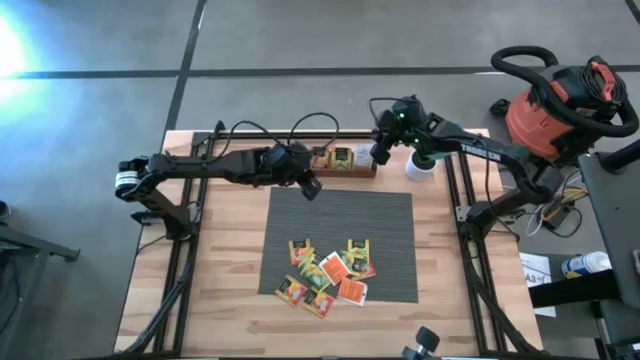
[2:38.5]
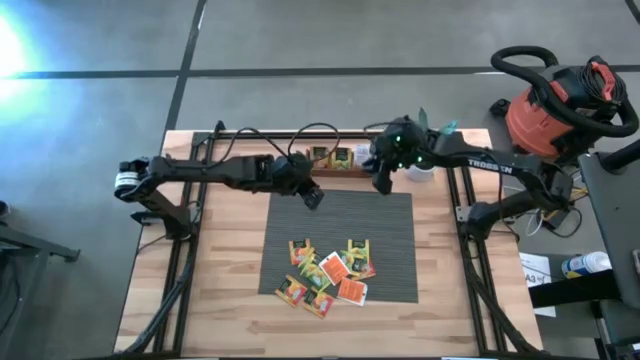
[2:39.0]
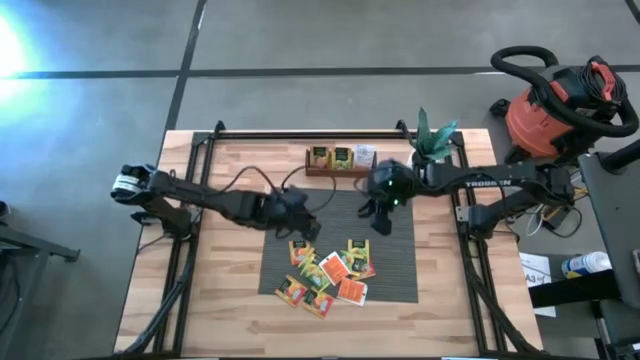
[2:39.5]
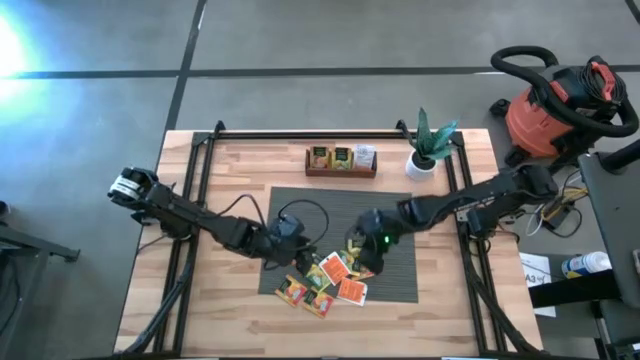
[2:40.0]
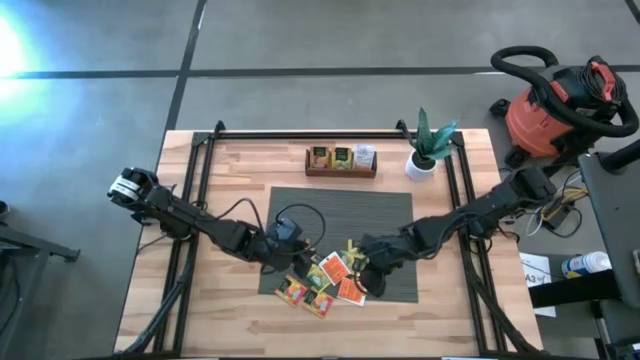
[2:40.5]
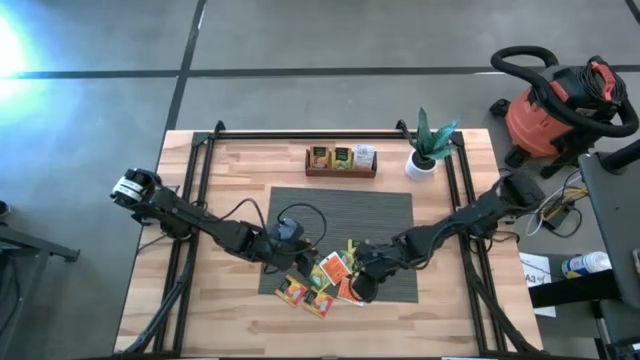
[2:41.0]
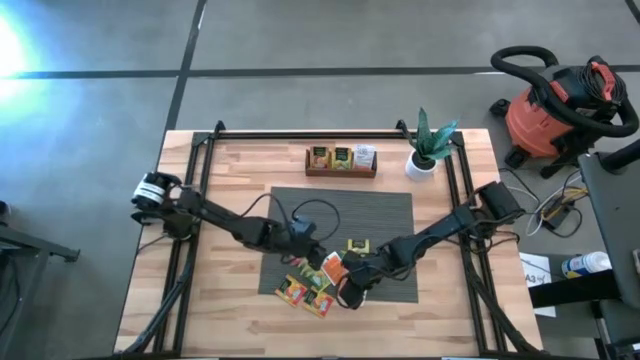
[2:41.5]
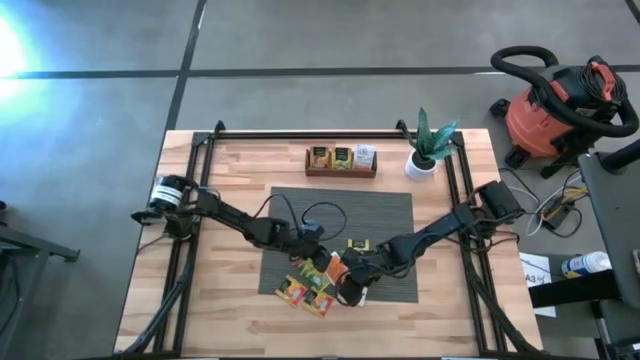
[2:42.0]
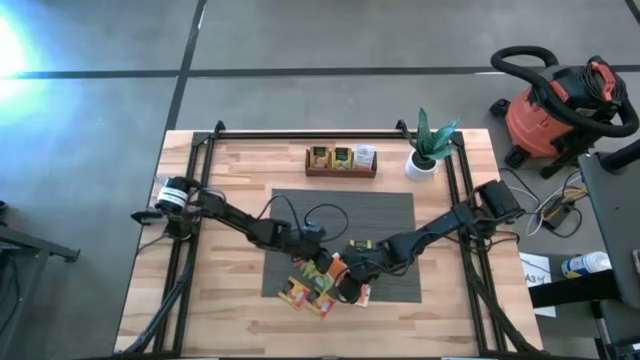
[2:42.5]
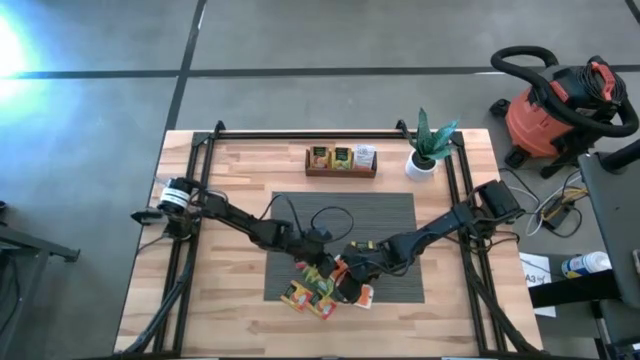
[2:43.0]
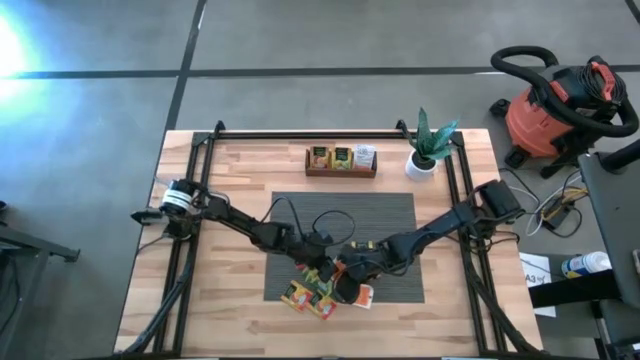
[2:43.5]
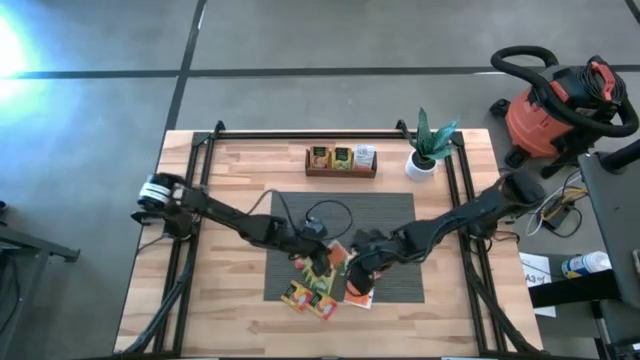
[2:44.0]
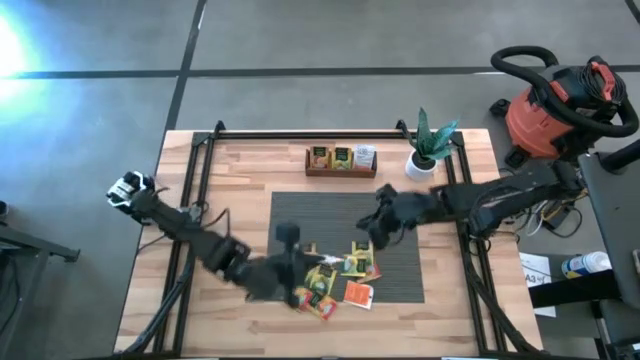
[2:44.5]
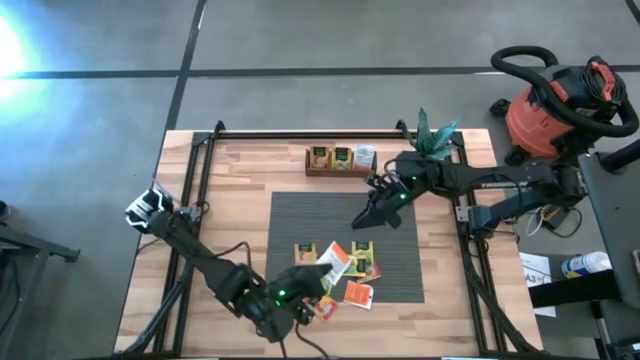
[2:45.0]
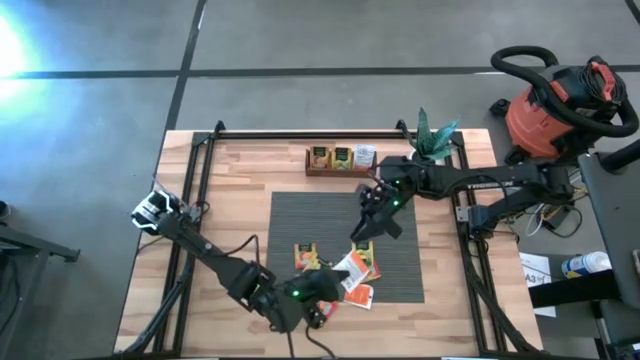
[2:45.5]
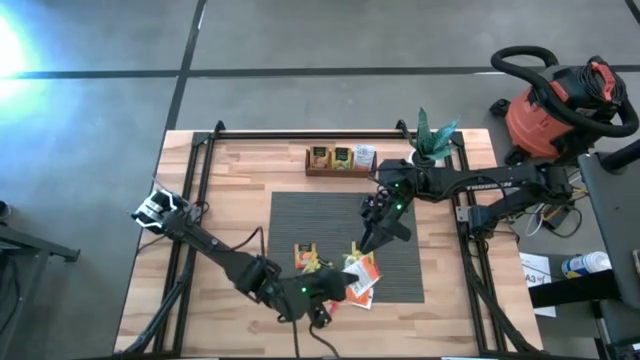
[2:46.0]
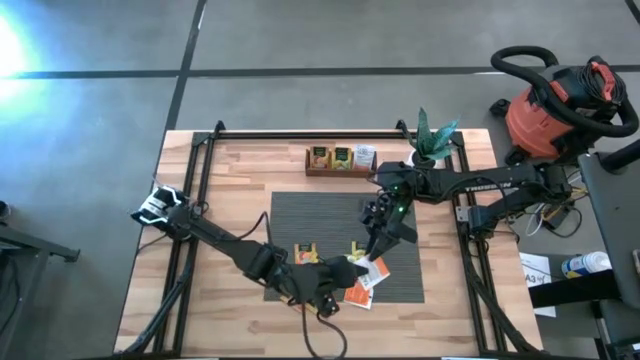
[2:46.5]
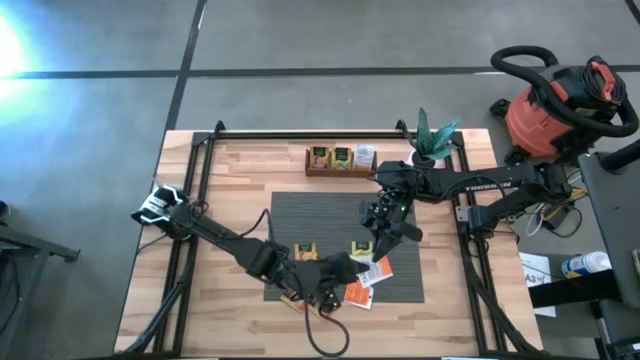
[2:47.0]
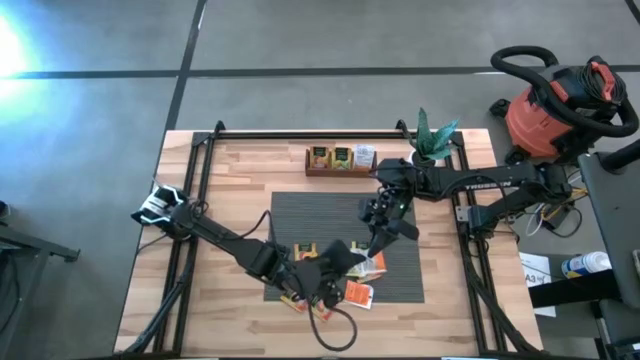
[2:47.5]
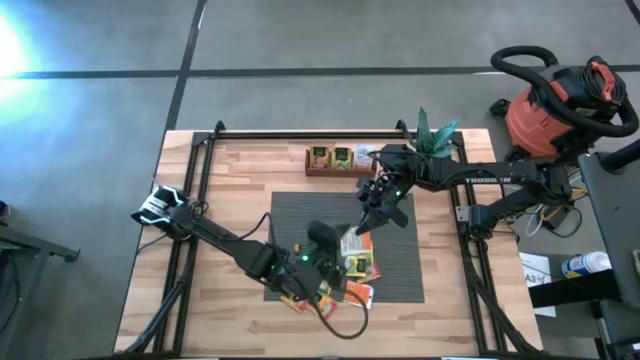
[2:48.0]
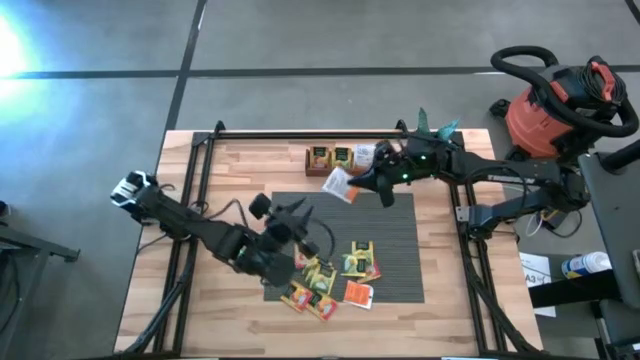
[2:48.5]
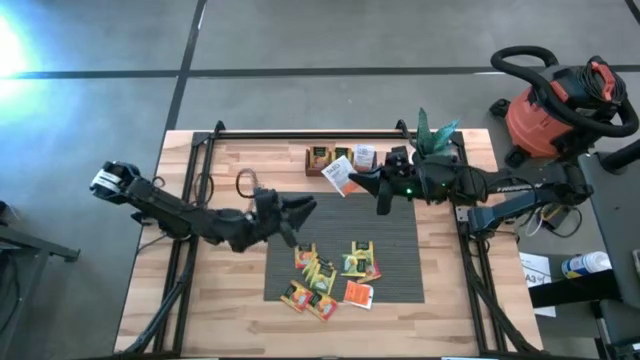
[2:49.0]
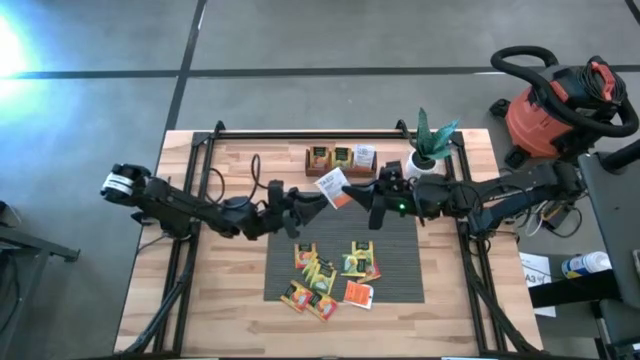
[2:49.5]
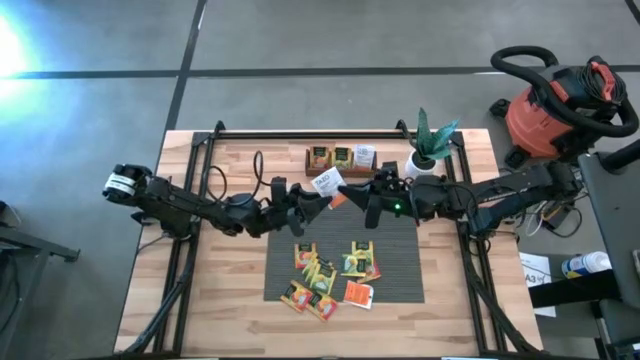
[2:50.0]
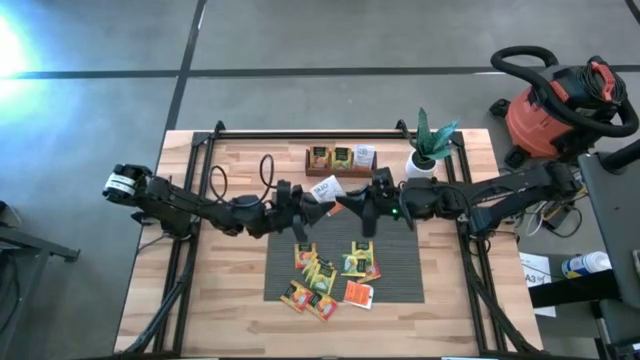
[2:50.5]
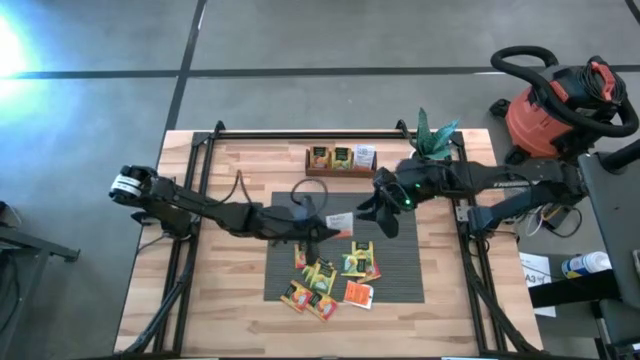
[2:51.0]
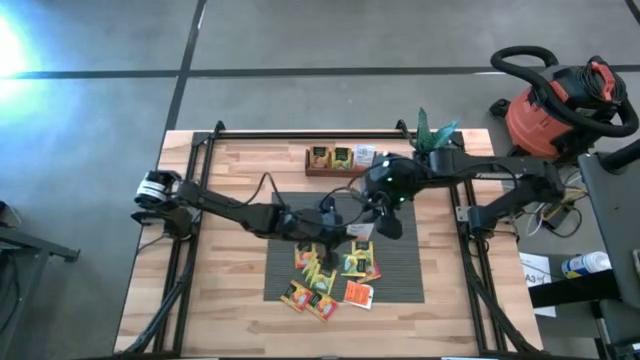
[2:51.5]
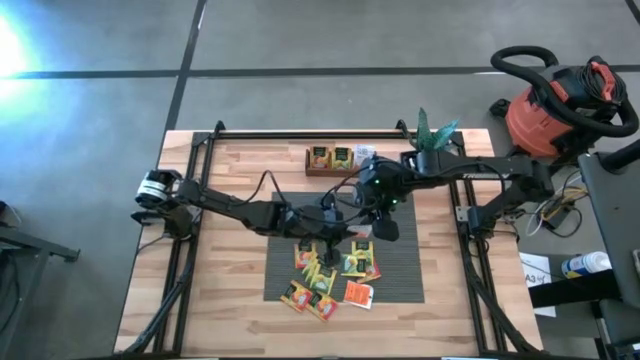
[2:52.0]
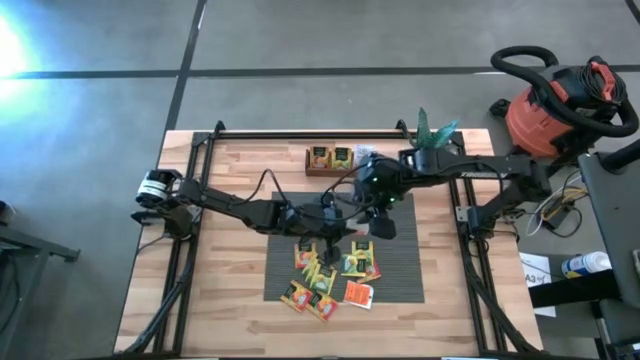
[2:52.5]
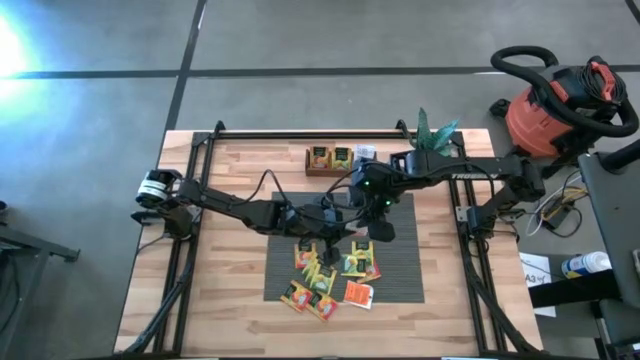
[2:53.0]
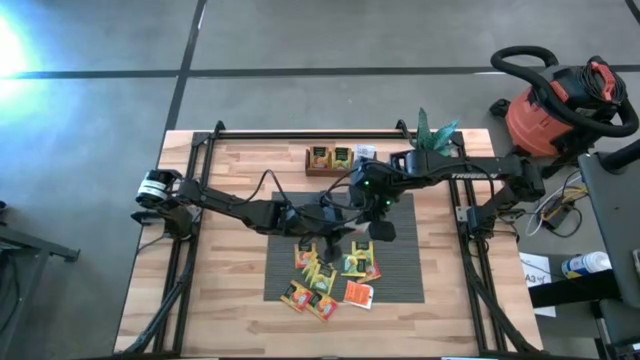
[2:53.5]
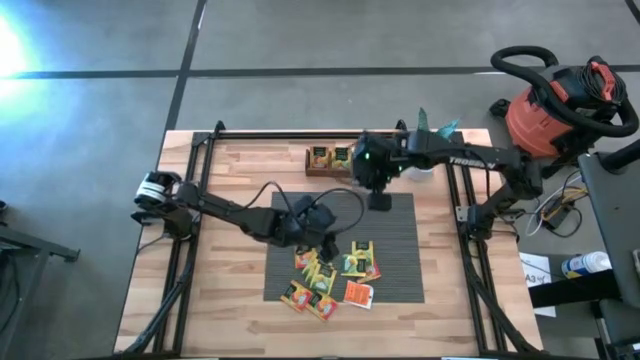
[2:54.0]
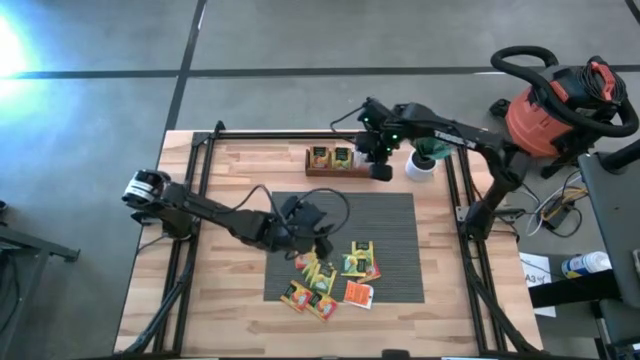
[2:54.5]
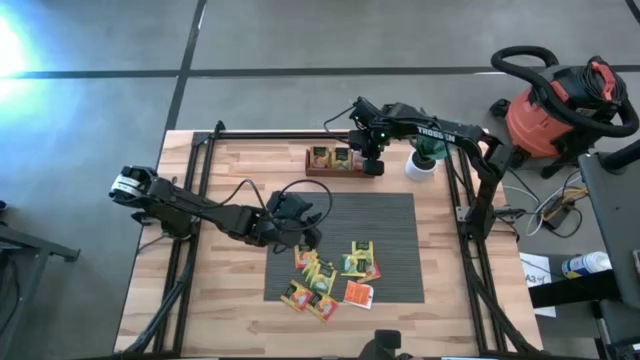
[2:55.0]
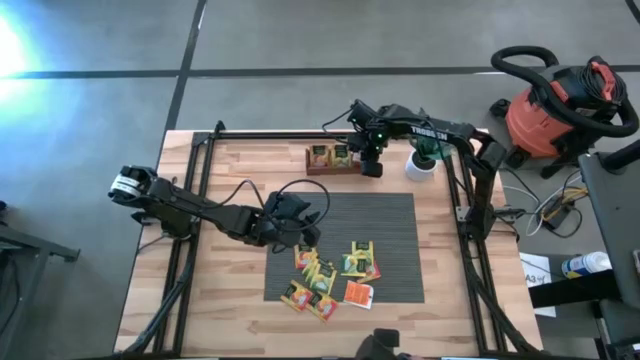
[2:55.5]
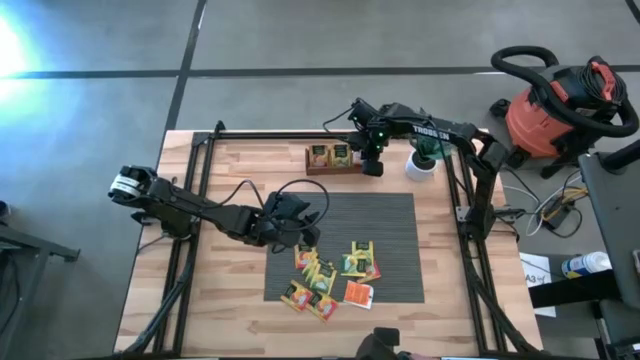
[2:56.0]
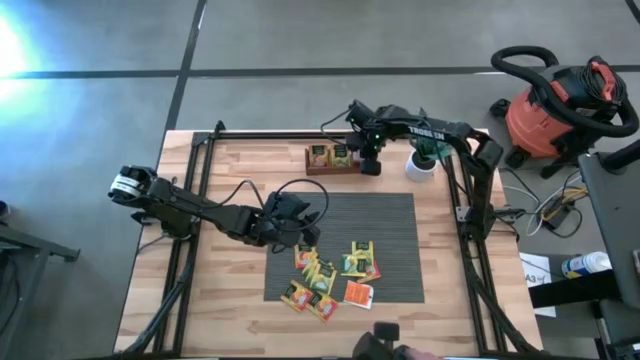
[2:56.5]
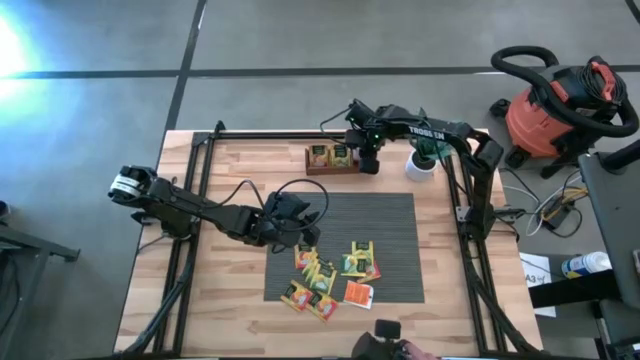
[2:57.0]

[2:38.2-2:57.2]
Task: Pick & Place Tea
Put the white orange tea bag into the right section of the wooden organizer

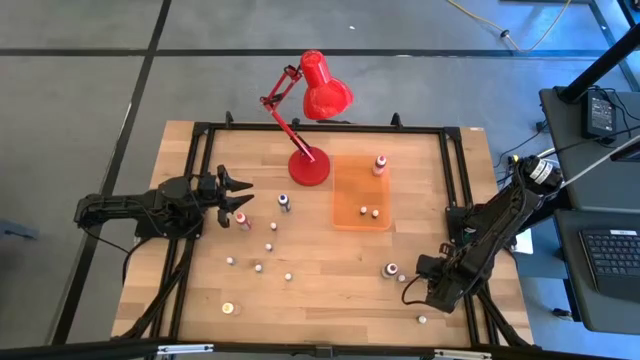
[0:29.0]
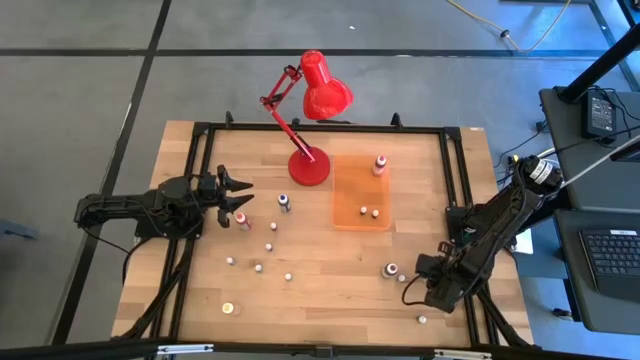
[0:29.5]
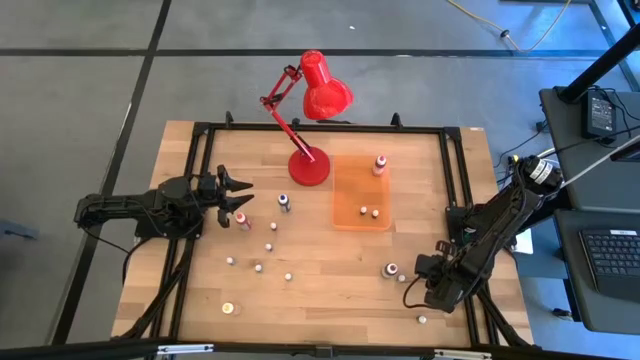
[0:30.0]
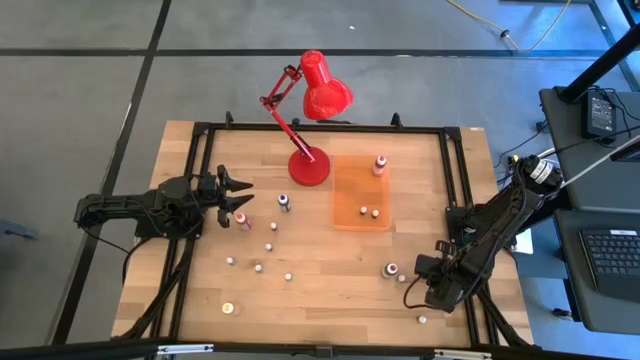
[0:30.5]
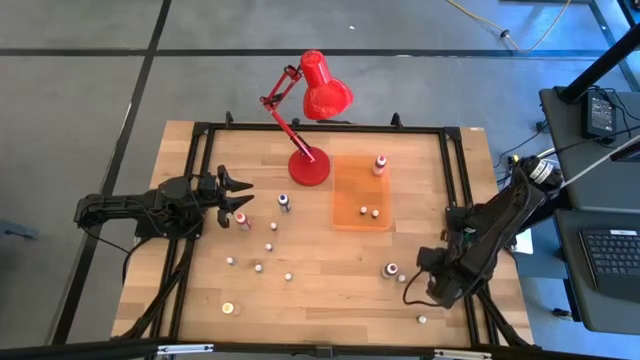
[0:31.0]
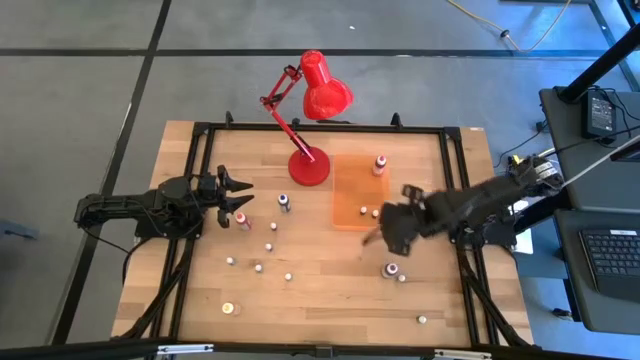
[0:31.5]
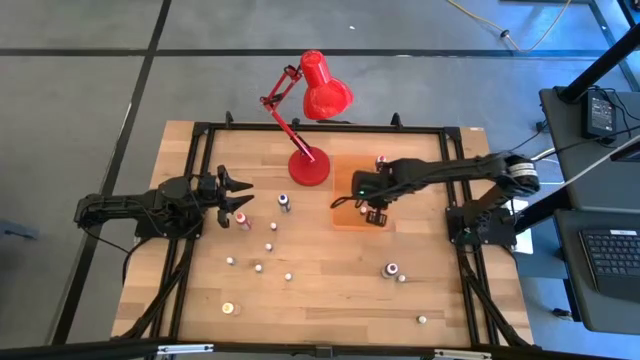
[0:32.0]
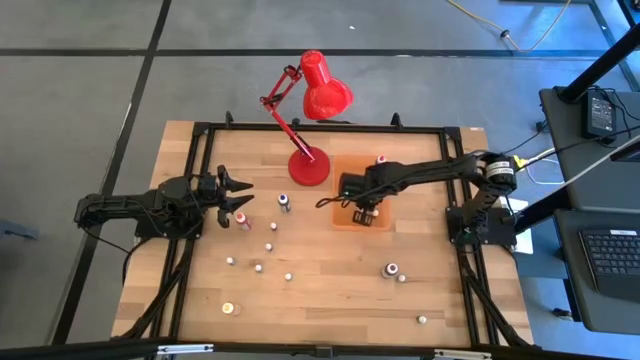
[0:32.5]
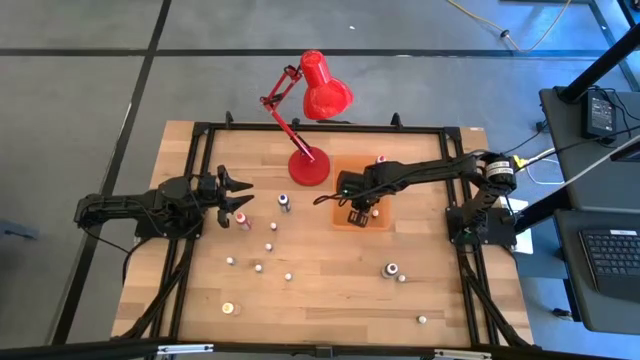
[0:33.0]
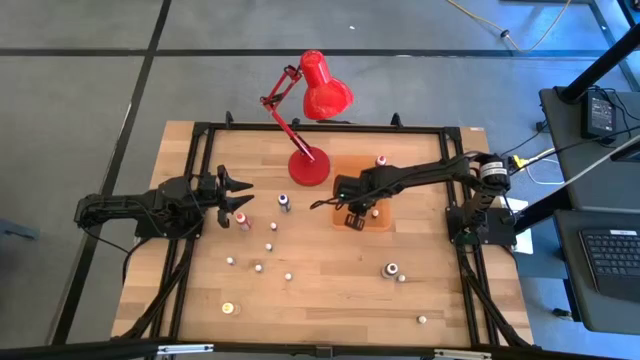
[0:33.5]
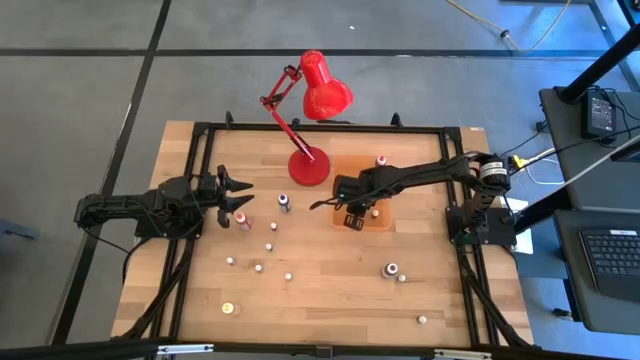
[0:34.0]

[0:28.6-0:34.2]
Task: Pick & Place food coloring
Put the right small purple food coloring bottle into the orange bin
